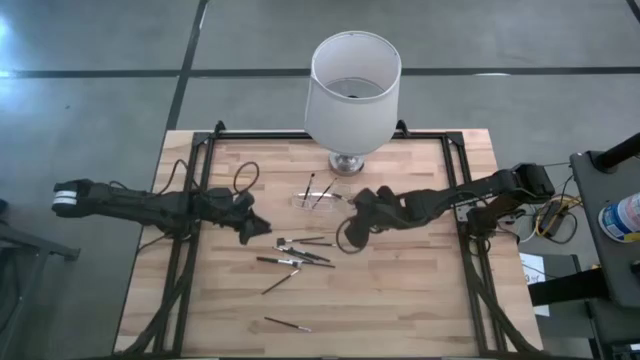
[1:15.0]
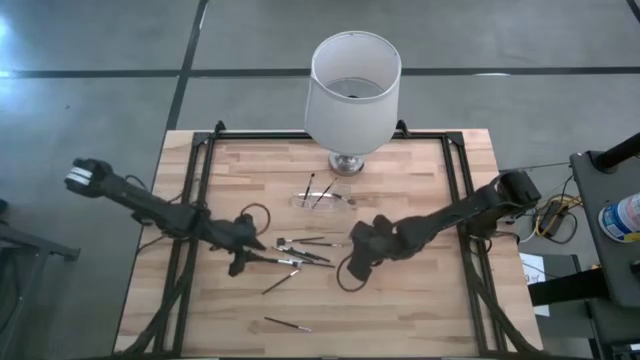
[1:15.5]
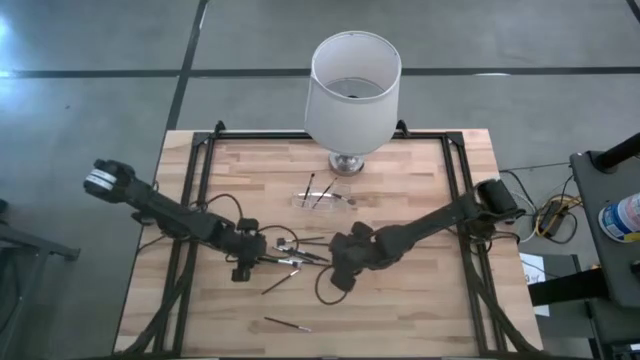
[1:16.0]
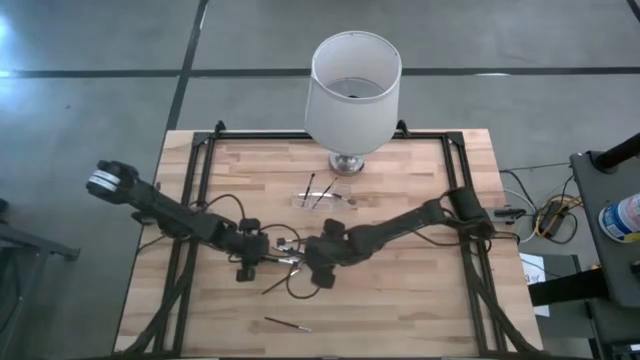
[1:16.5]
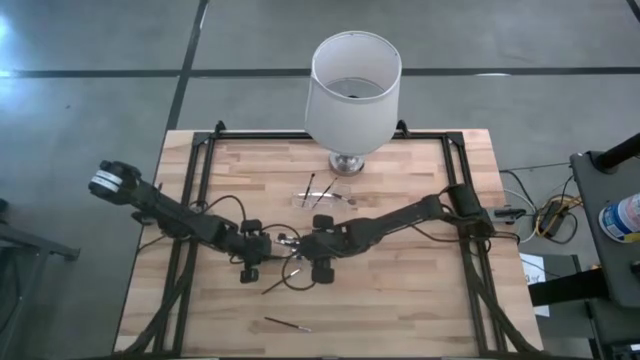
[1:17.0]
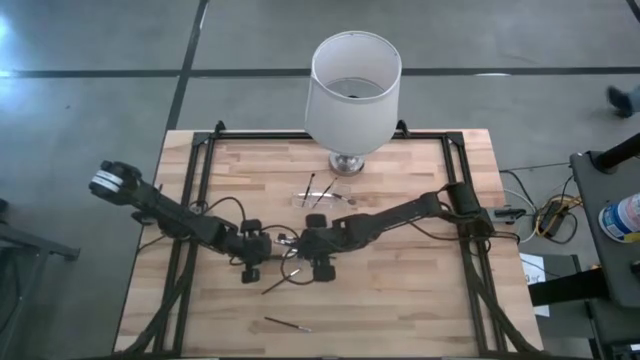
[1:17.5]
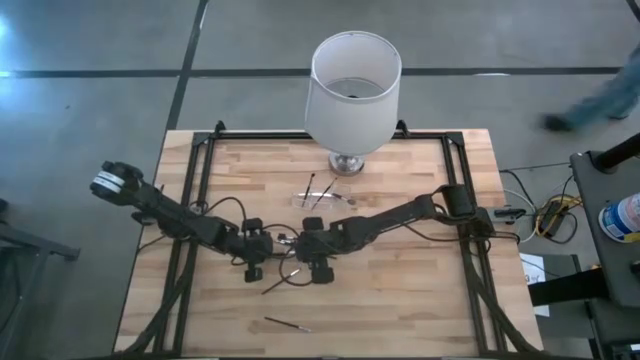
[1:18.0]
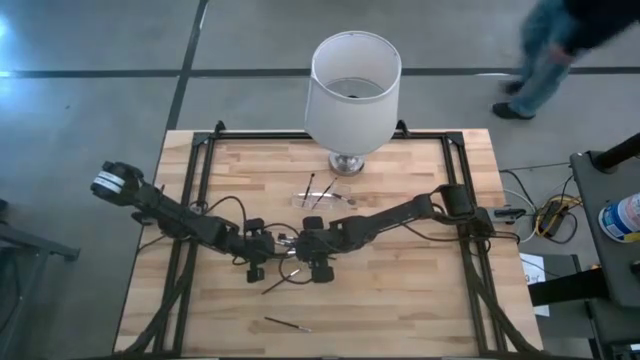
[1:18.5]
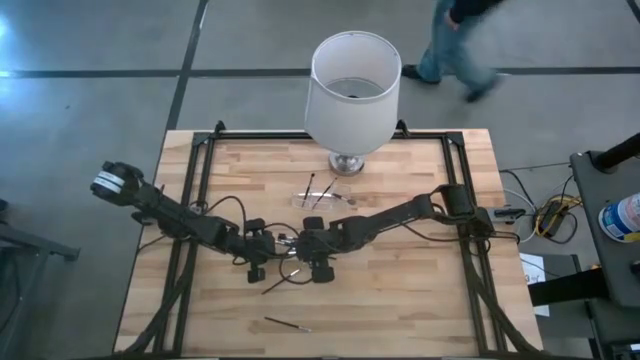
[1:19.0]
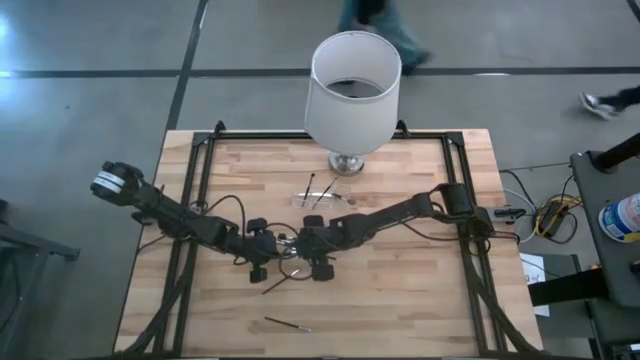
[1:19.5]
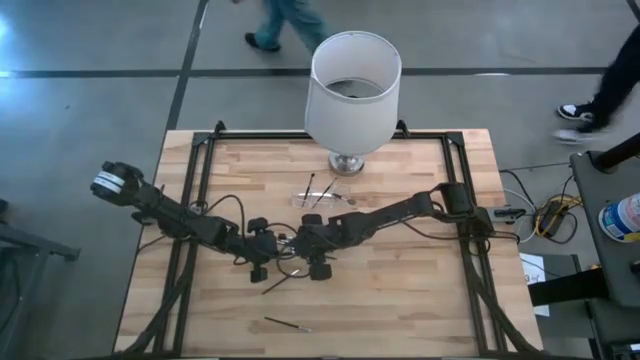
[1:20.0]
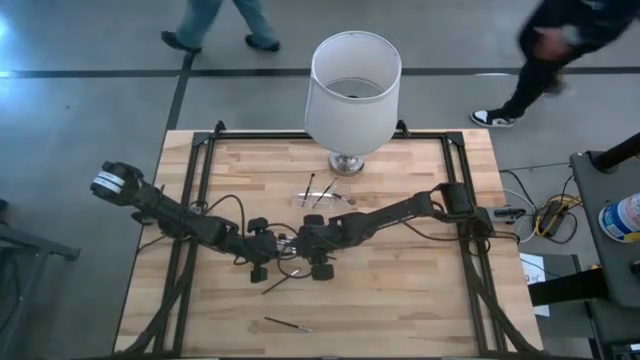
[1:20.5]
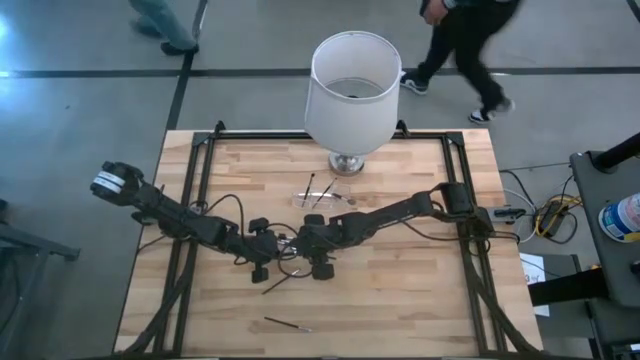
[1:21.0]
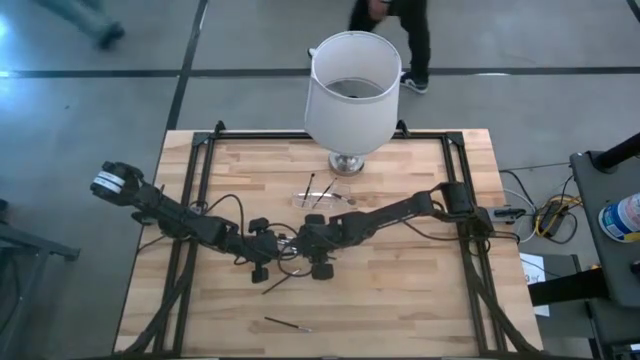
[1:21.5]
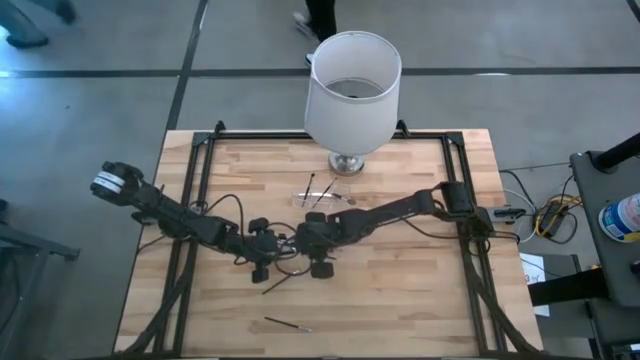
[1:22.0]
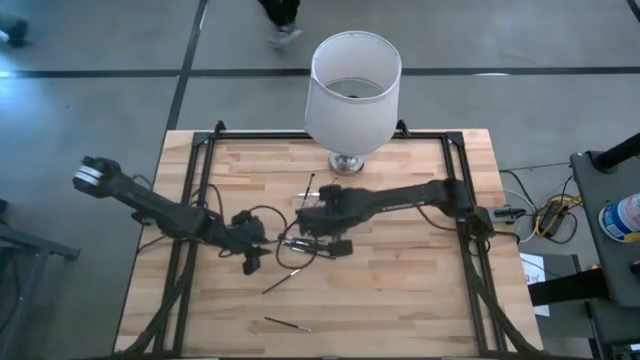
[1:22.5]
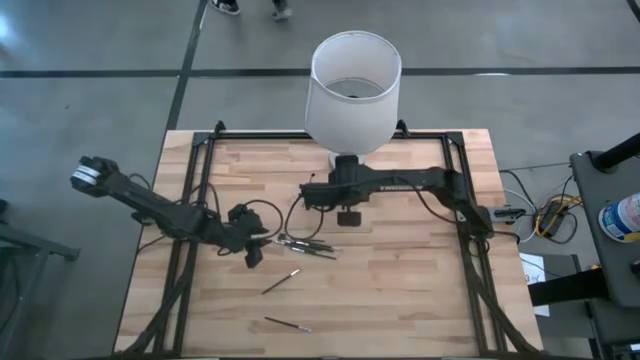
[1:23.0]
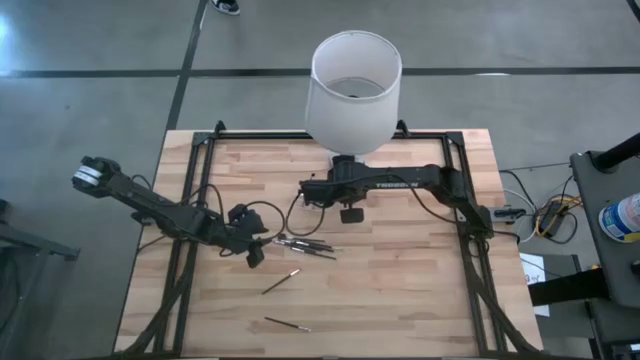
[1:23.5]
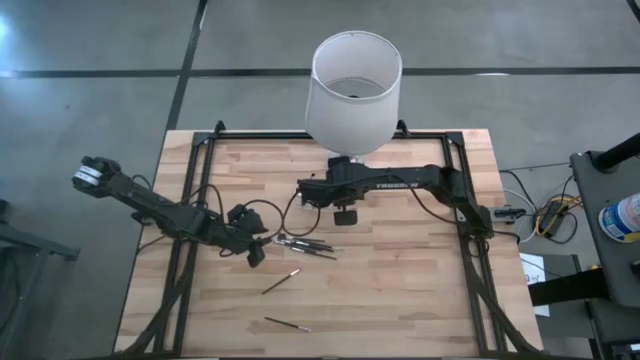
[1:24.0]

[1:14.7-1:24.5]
Task: Put items in baskets/containers
Put the blush brush into the transparent organizer

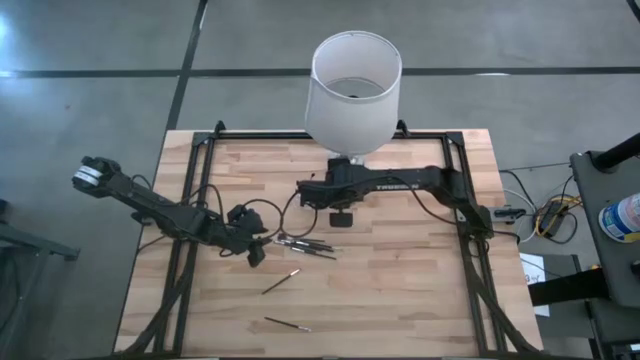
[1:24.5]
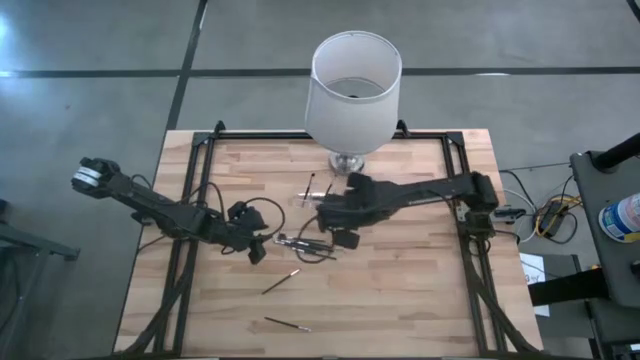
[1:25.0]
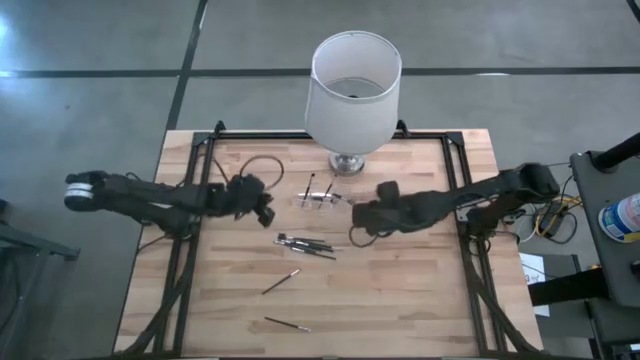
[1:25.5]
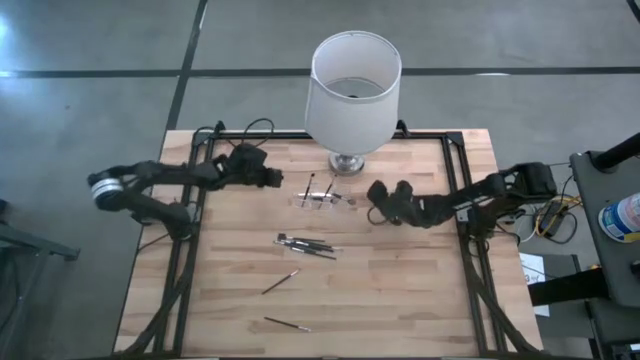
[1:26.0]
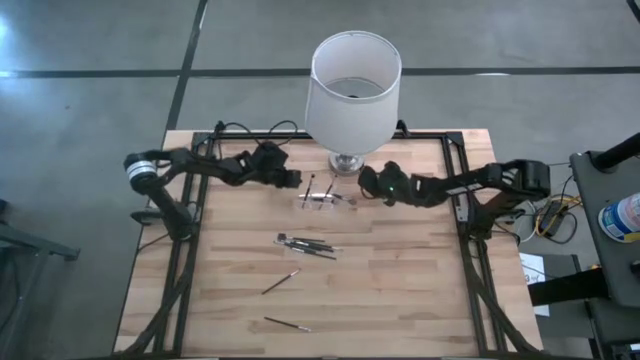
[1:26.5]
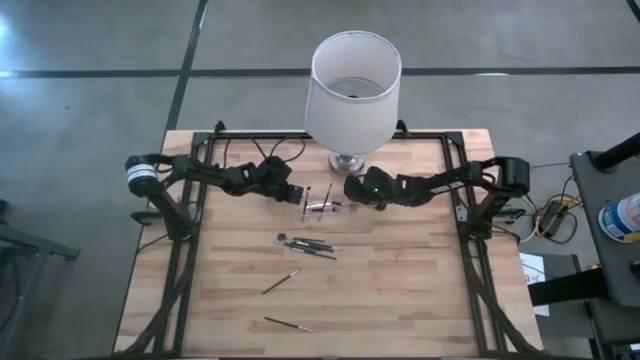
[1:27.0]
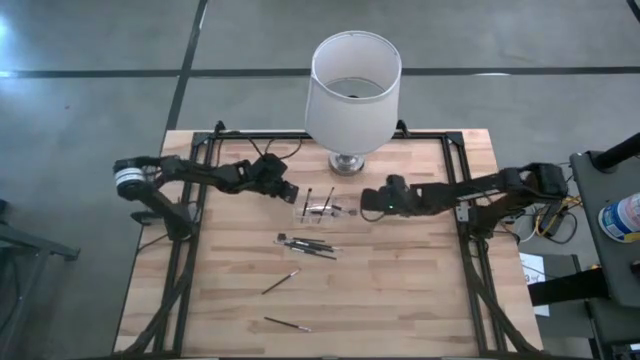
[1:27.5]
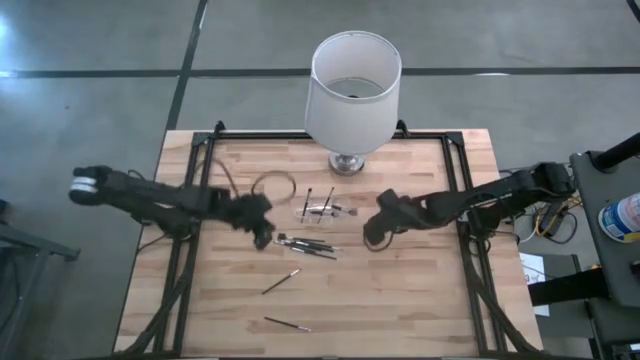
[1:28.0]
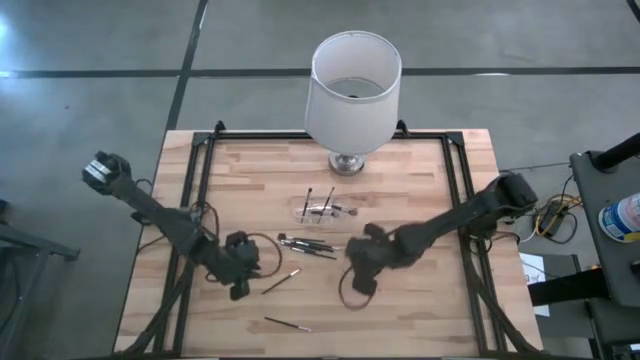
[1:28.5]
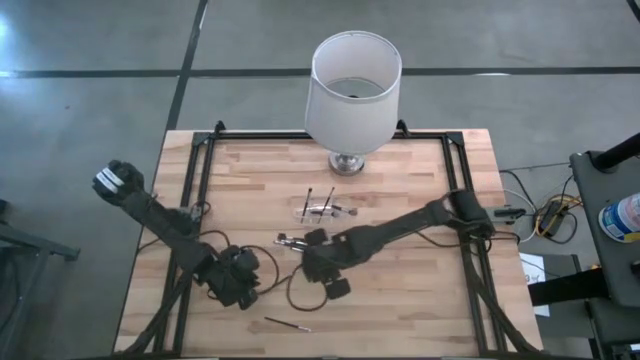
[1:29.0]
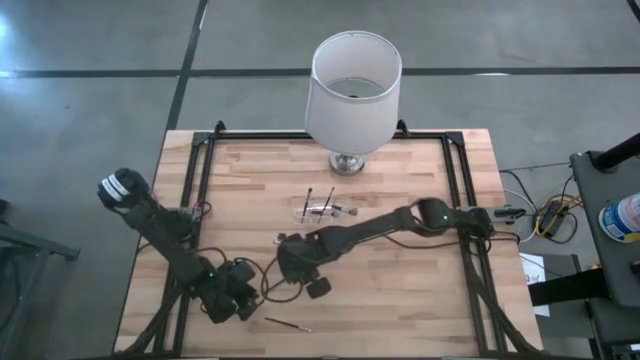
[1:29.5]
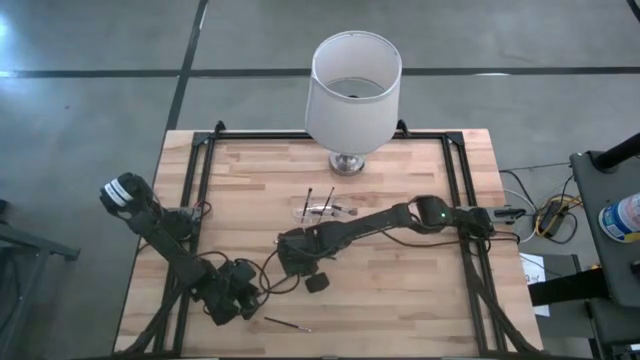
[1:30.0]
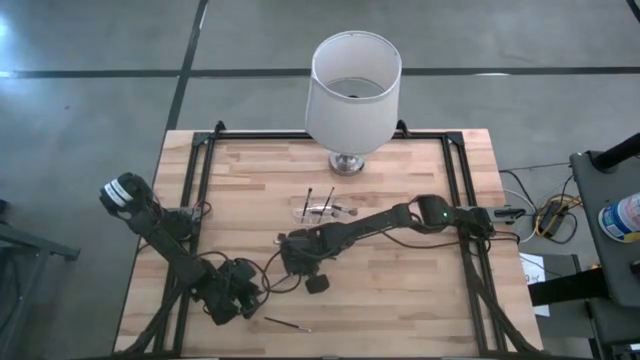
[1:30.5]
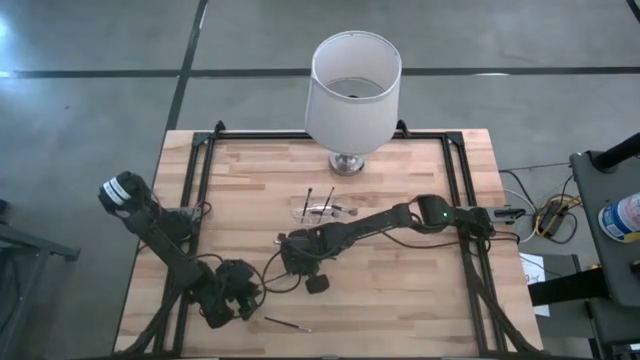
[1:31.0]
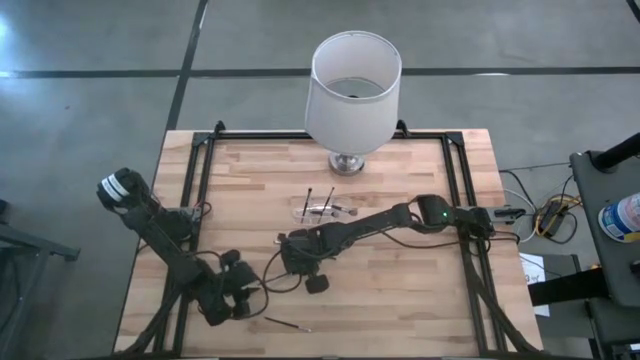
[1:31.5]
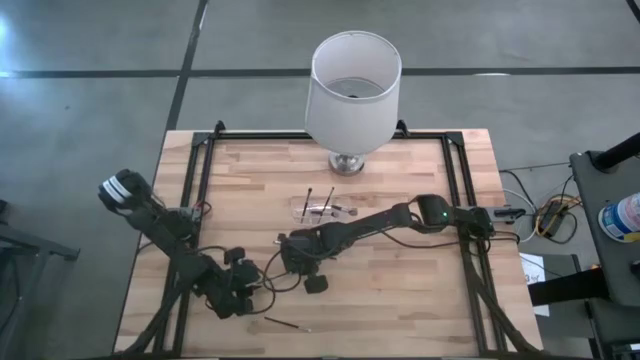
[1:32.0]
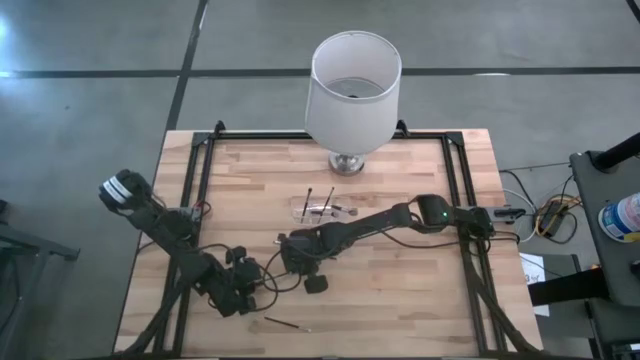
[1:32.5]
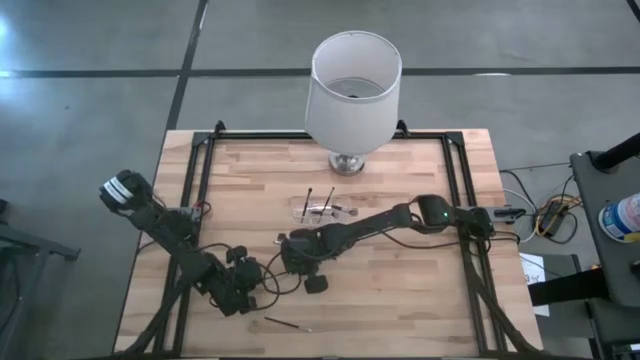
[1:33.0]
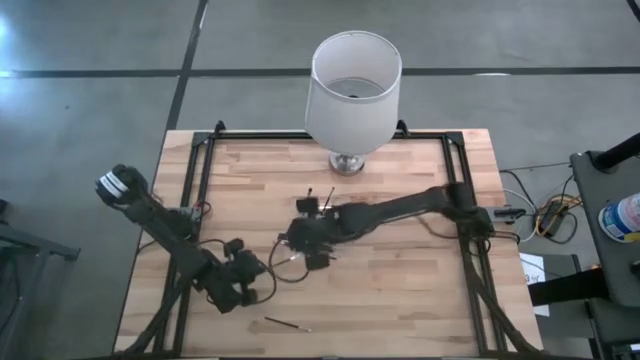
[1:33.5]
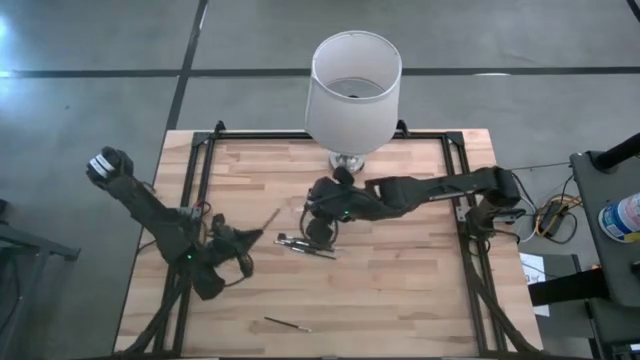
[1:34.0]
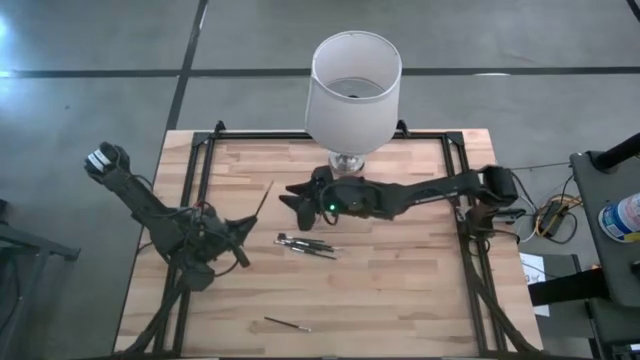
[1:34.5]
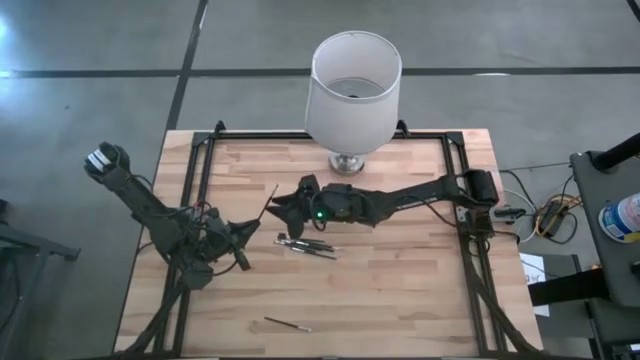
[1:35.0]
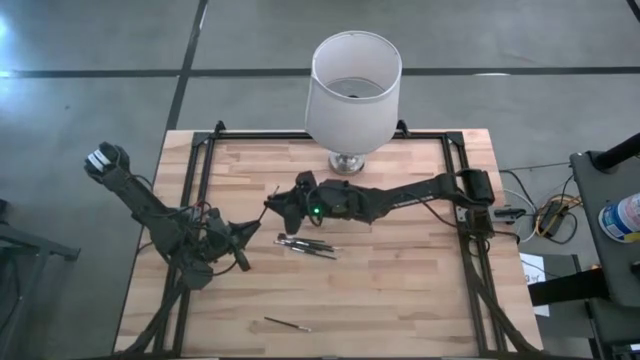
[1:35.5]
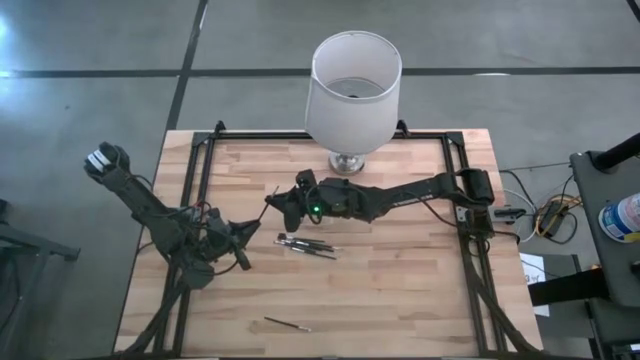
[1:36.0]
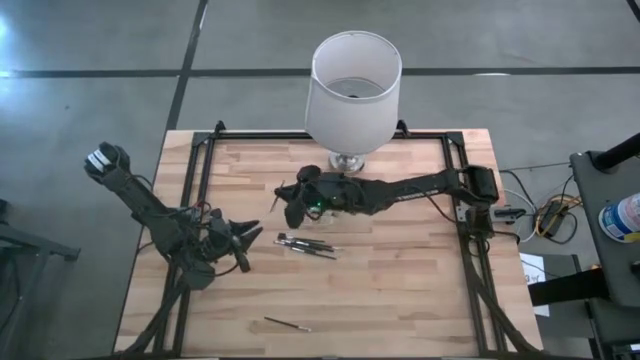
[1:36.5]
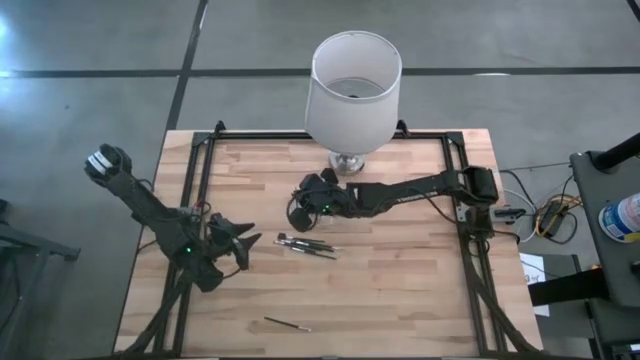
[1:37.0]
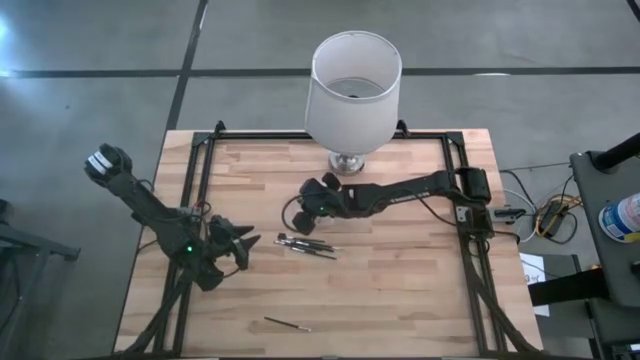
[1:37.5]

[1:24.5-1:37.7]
Put the eyeshadow brush into the transparent organizer
